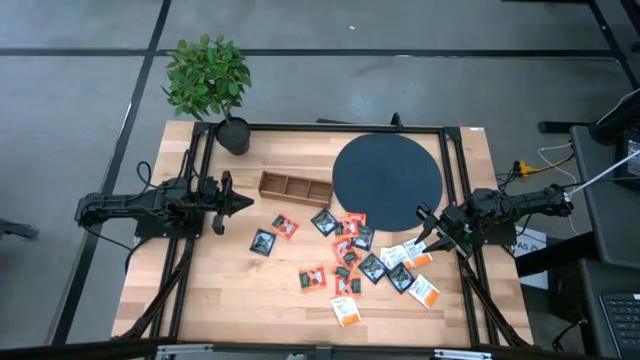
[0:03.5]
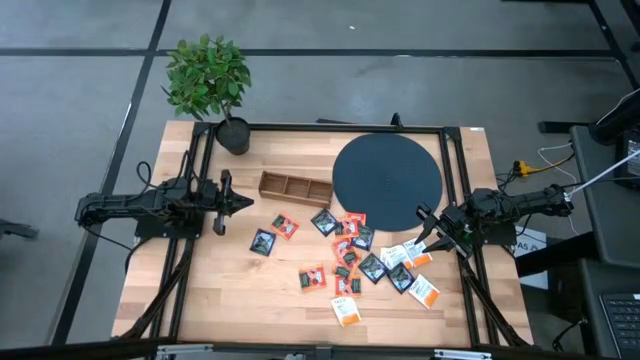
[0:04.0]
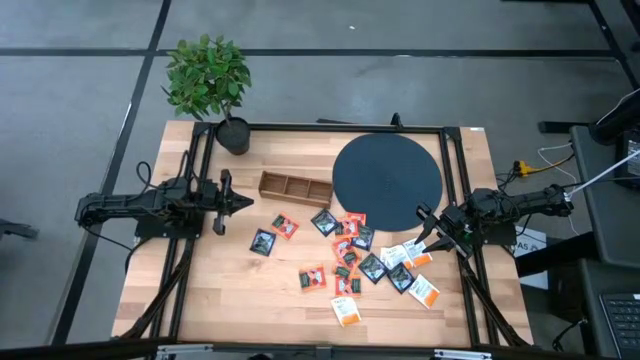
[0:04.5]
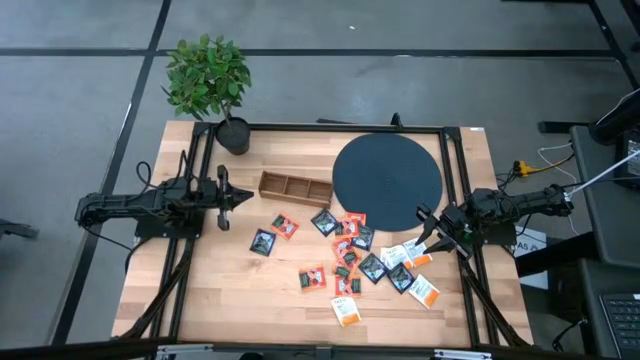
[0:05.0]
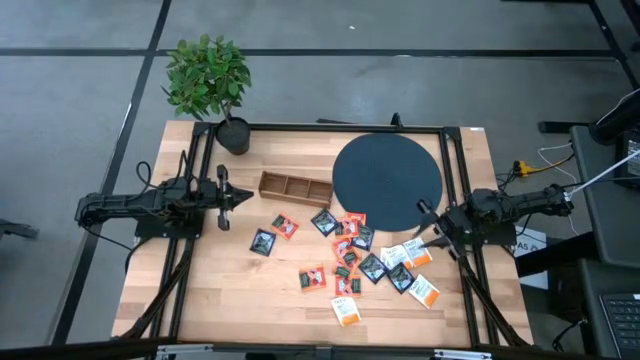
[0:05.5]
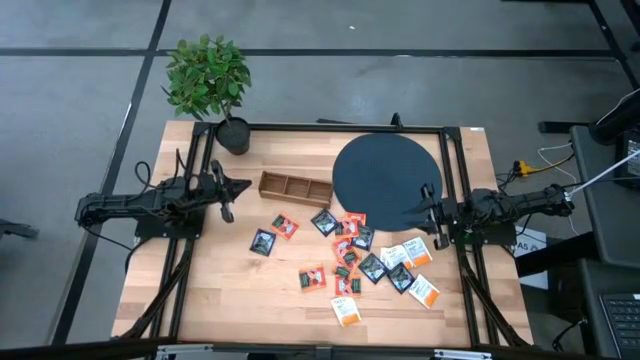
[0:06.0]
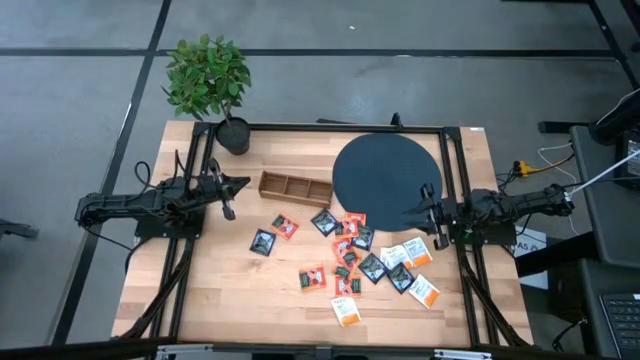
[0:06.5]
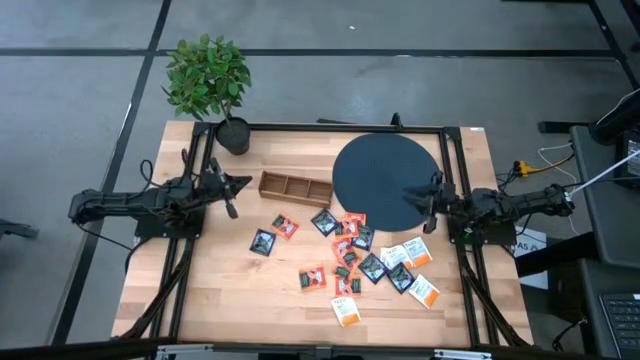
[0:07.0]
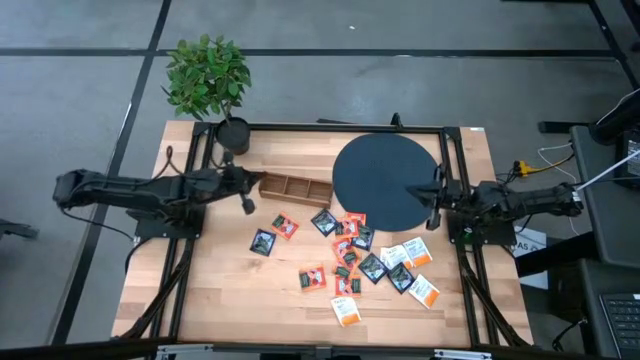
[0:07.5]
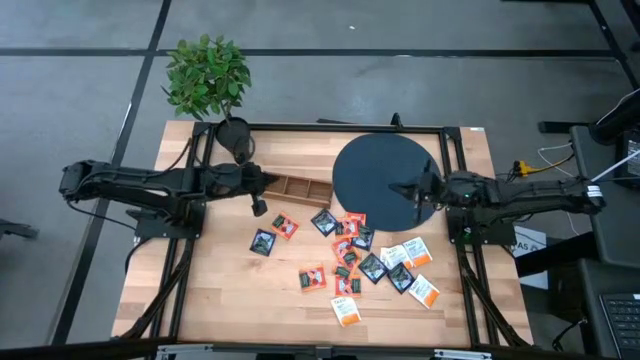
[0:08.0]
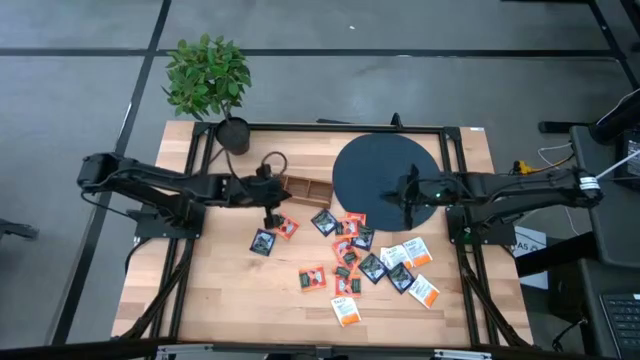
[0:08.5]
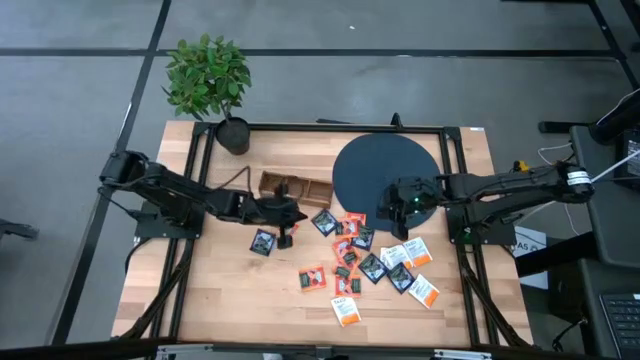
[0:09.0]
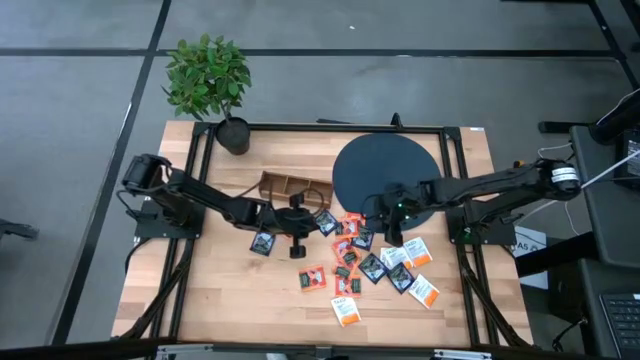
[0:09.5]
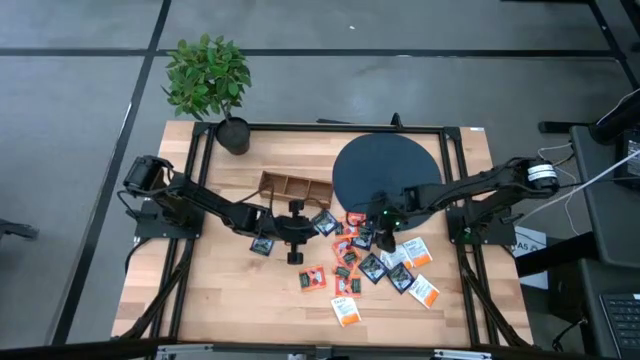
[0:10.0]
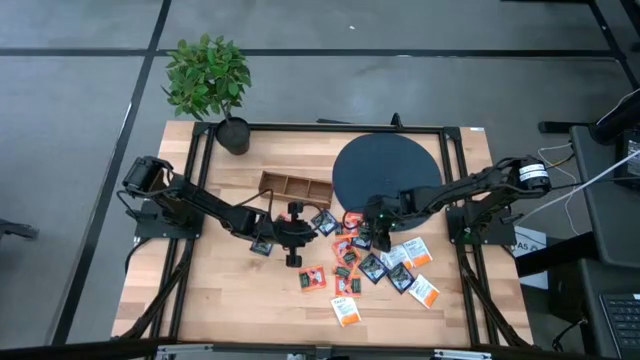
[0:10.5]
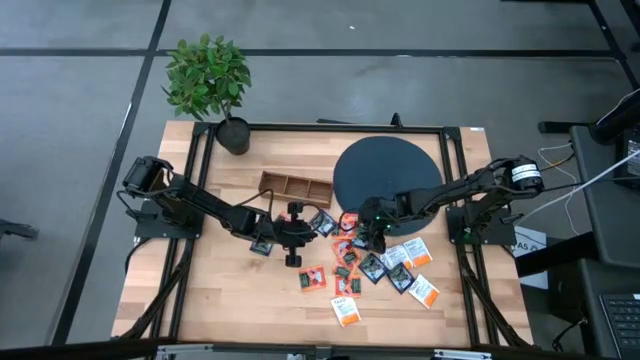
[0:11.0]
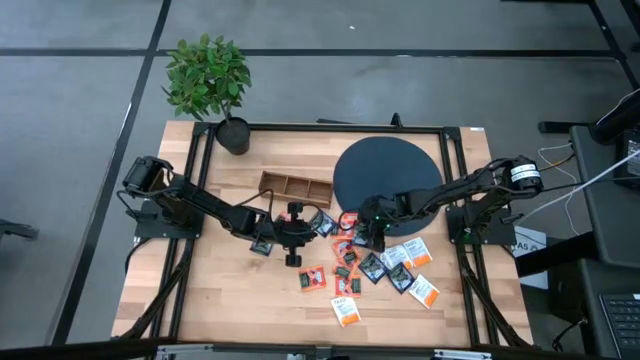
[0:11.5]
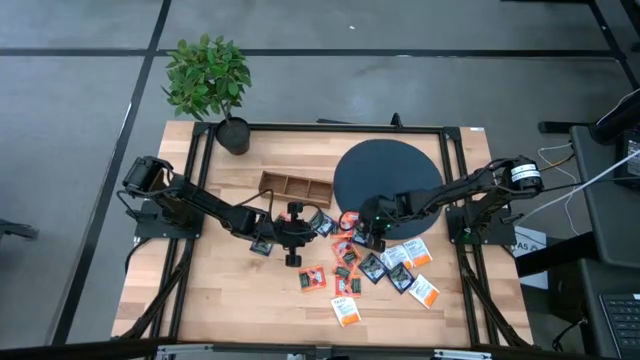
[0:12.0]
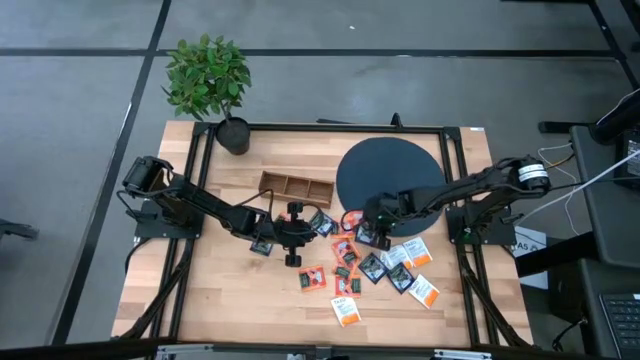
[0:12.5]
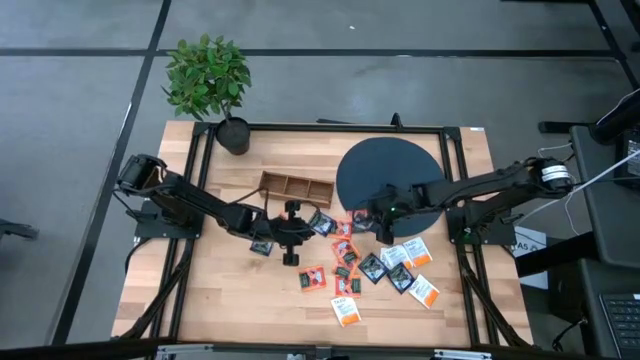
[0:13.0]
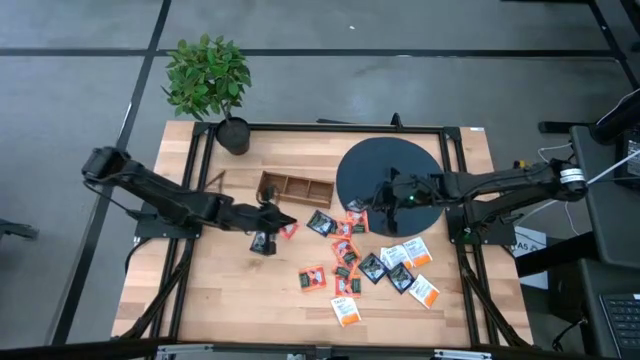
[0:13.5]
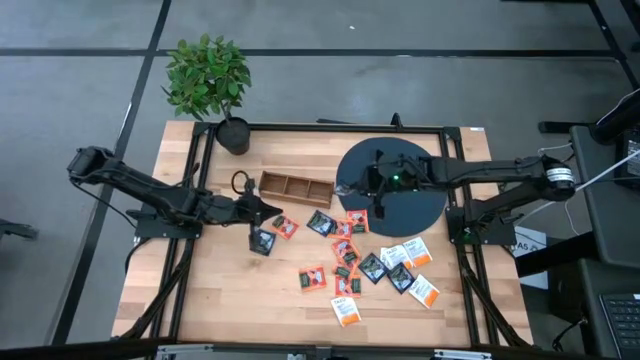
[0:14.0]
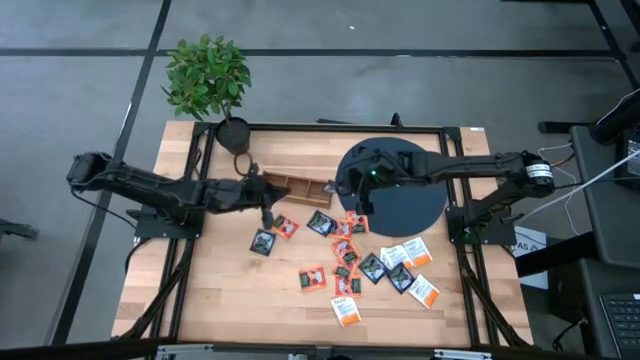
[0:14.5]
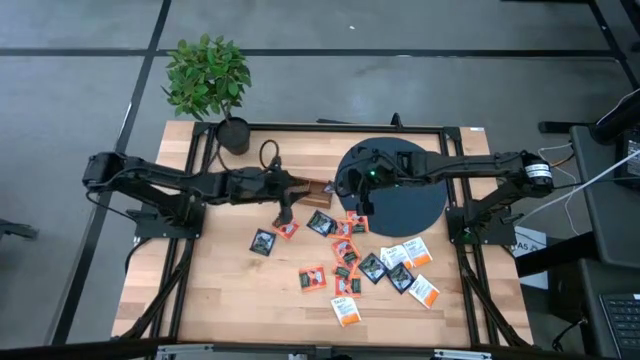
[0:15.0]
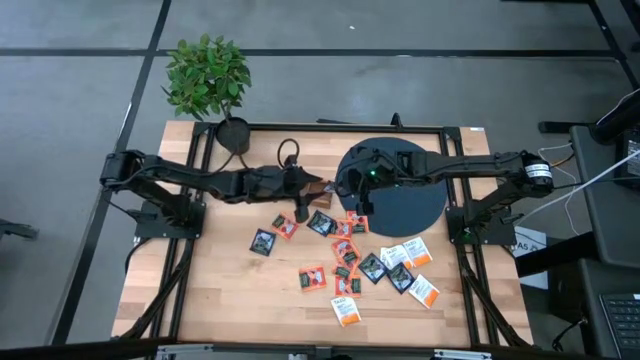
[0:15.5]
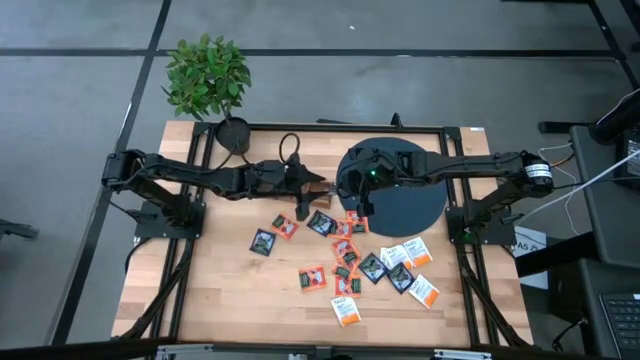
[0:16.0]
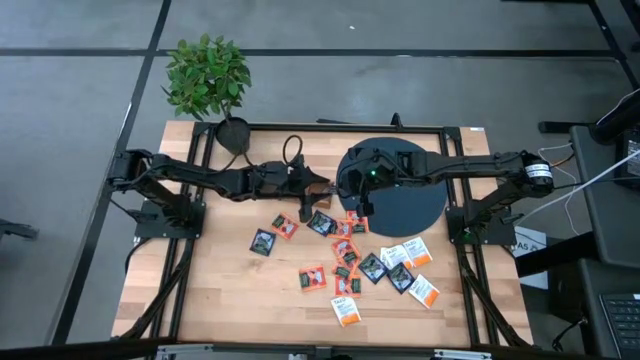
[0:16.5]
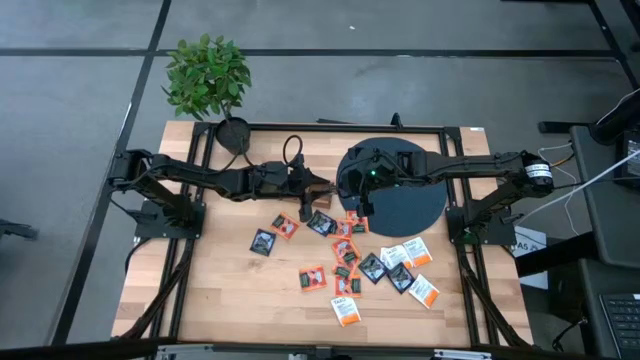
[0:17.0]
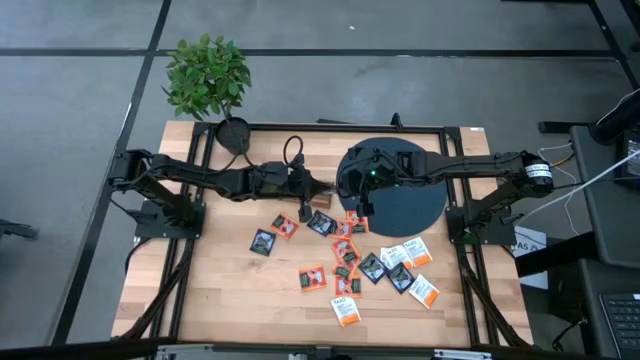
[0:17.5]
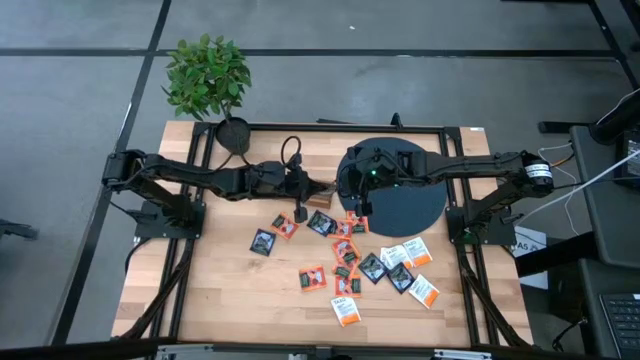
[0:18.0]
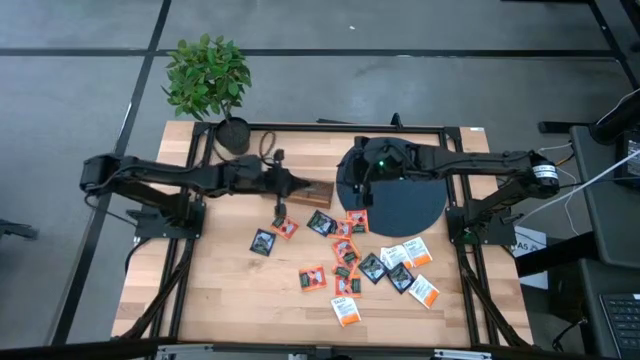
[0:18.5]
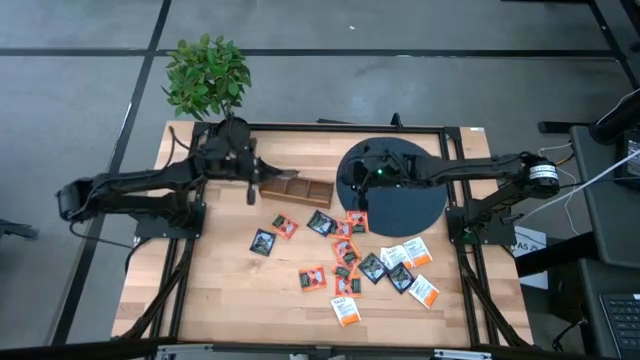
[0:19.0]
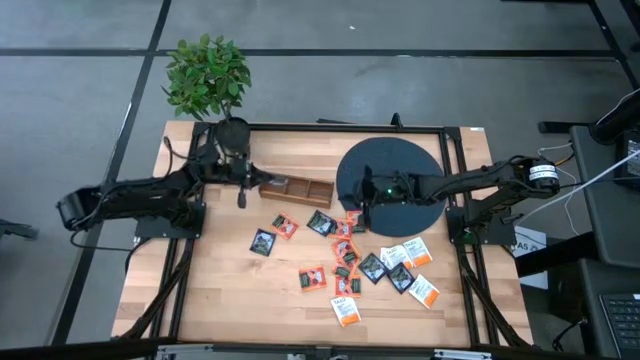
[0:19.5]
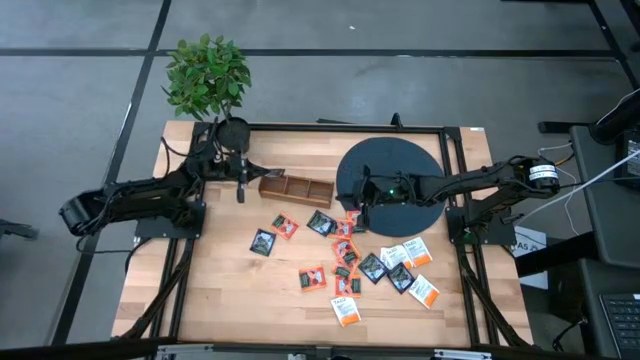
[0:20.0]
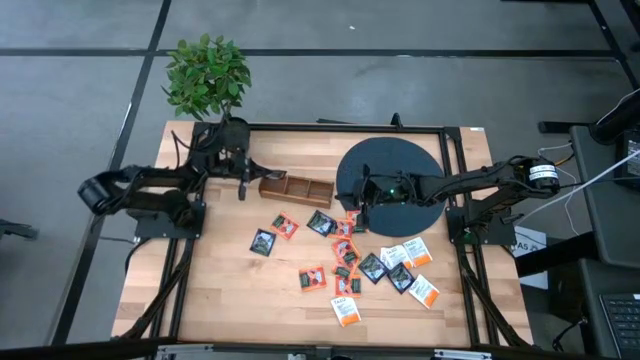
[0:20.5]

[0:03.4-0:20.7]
Task: Pick & Place Tea
Put the dark blue tea bag into the left section of the wooden organizer

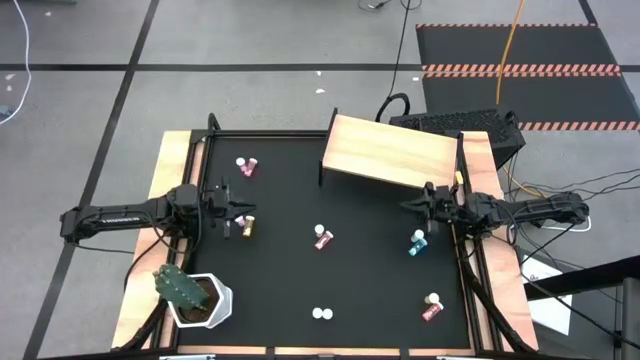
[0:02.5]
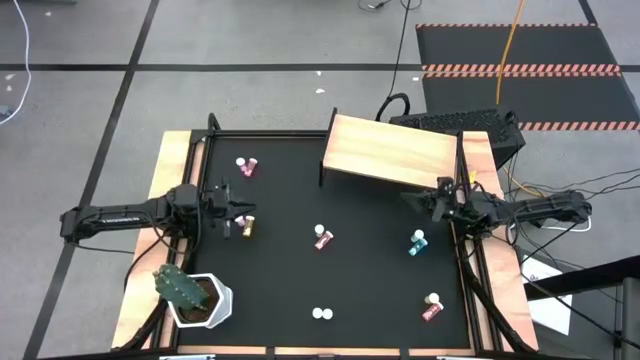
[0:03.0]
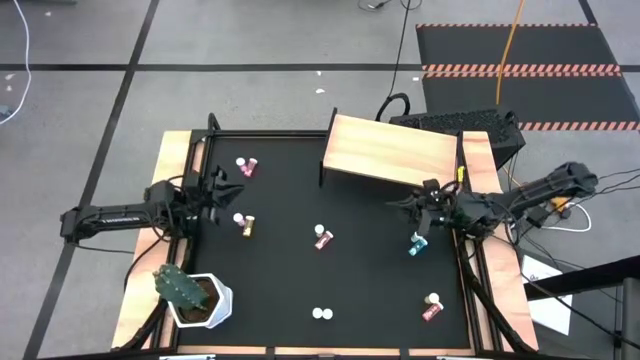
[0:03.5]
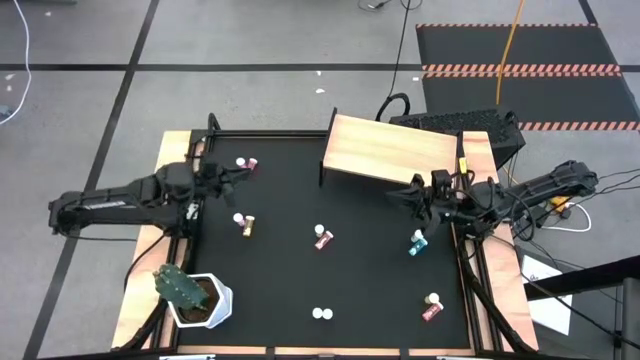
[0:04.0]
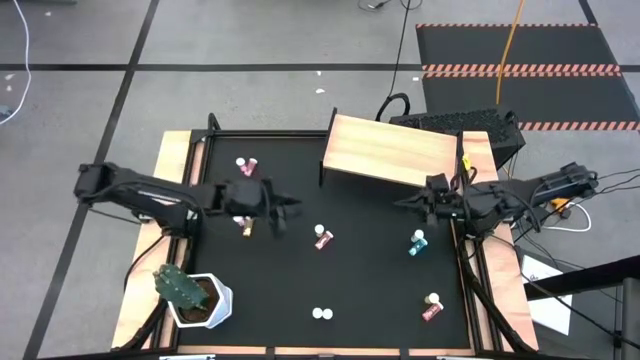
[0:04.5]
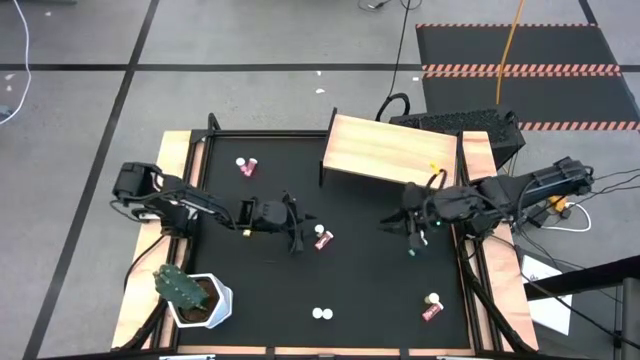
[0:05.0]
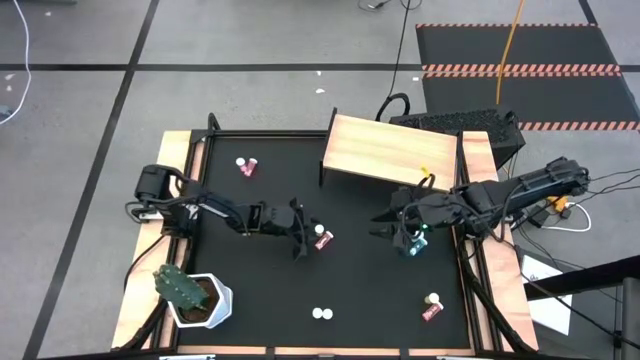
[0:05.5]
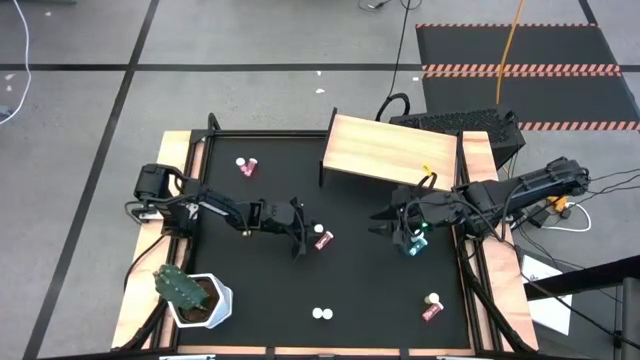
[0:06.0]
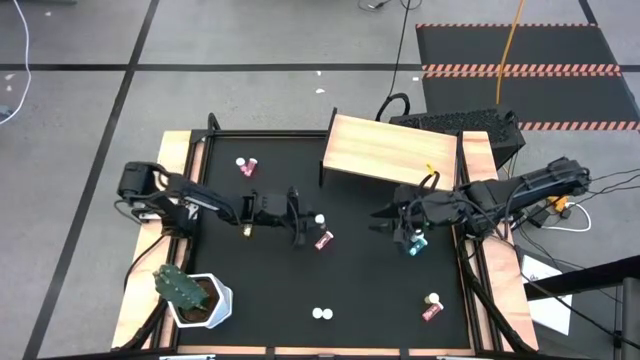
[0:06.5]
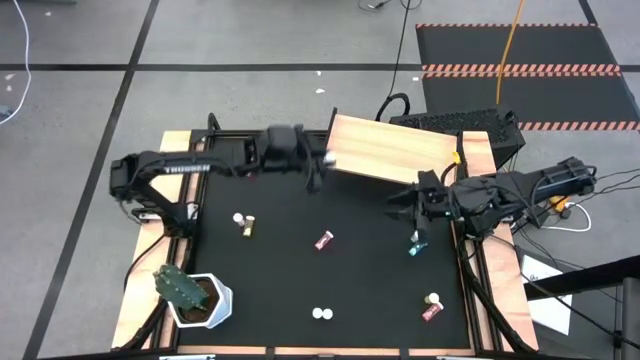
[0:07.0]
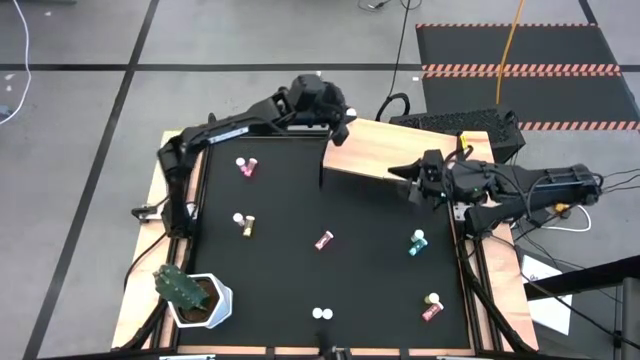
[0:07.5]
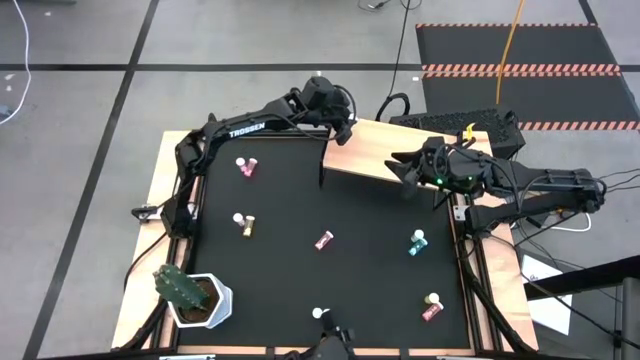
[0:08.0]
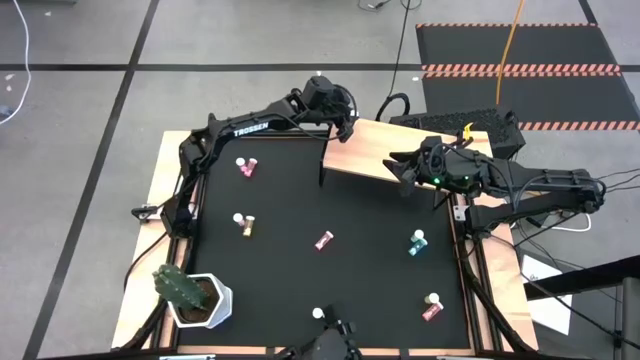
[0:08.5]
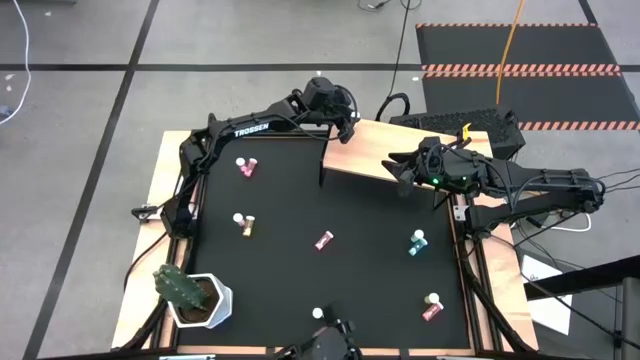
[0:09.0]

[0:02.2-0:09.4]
Task: Pick and place medicine bottles onto shelf by color
Put the center yellow pill bottle on the shelf
